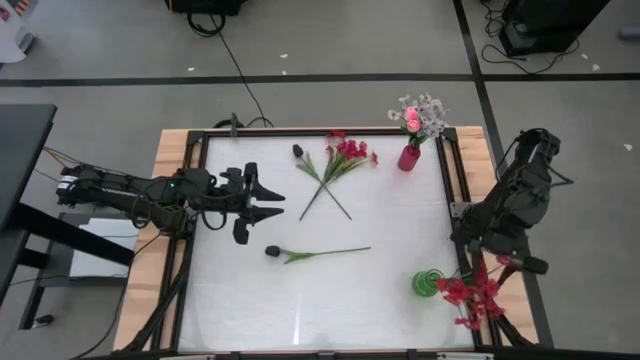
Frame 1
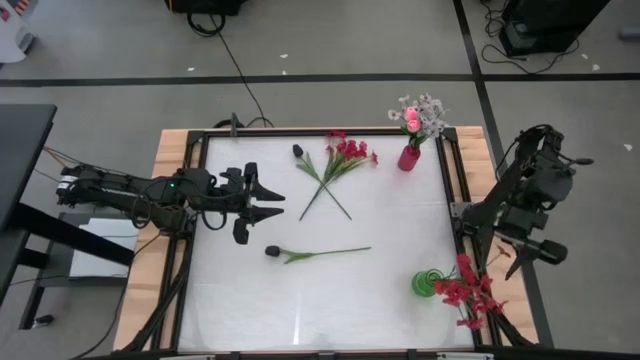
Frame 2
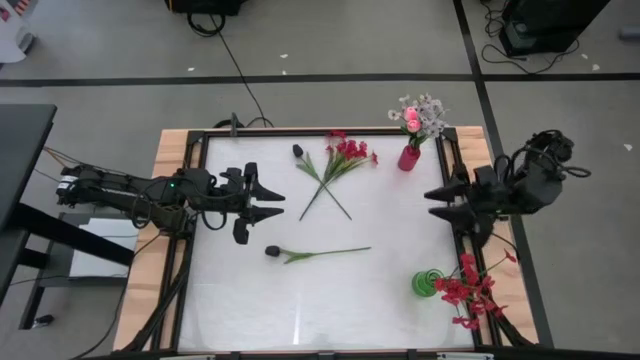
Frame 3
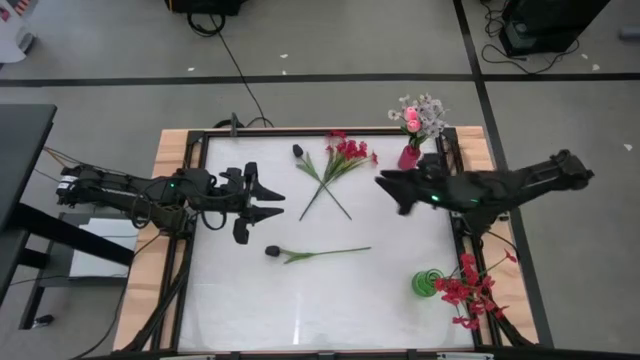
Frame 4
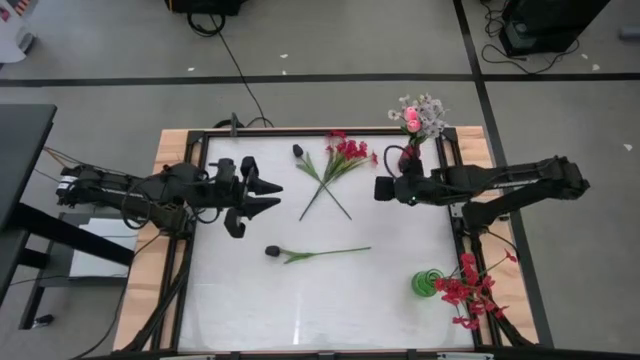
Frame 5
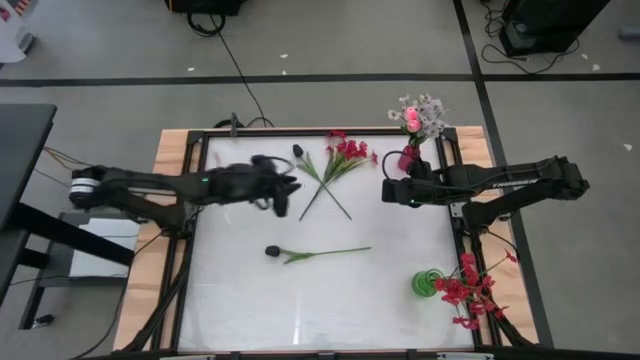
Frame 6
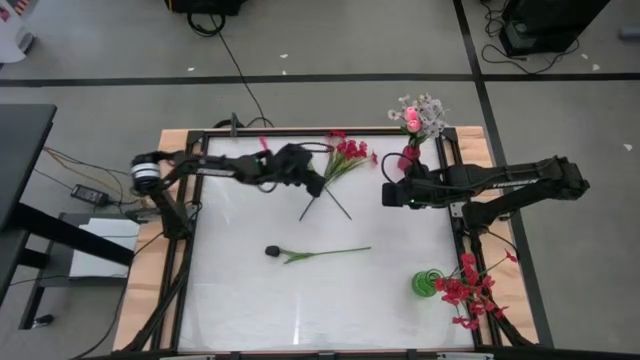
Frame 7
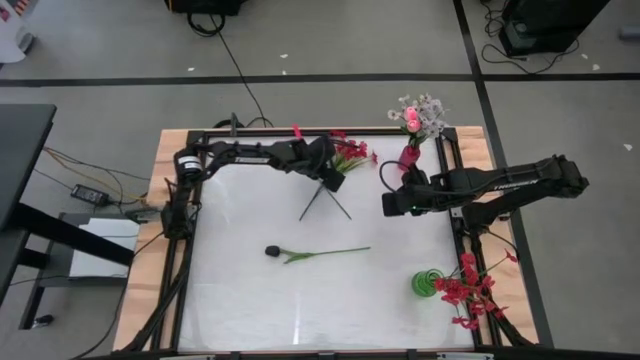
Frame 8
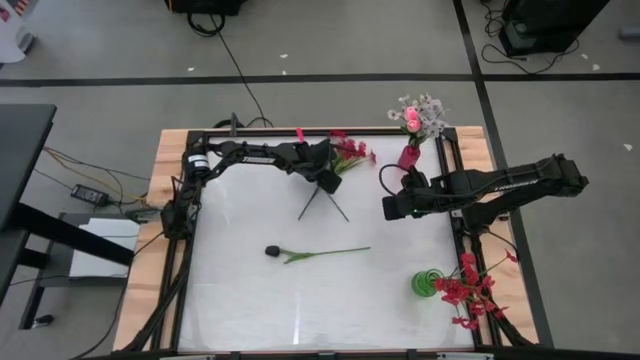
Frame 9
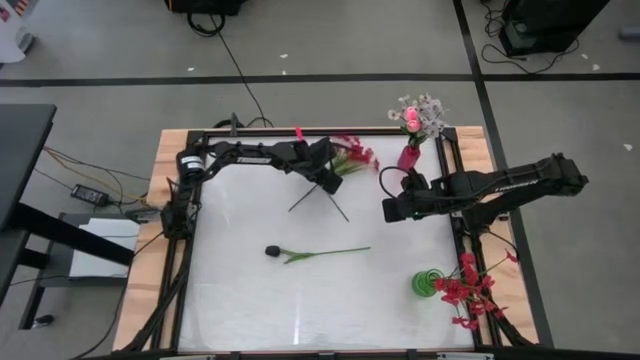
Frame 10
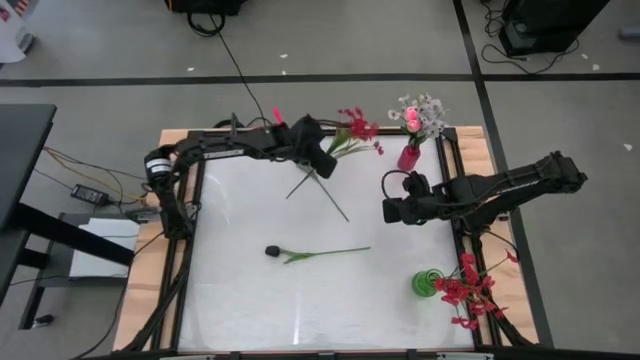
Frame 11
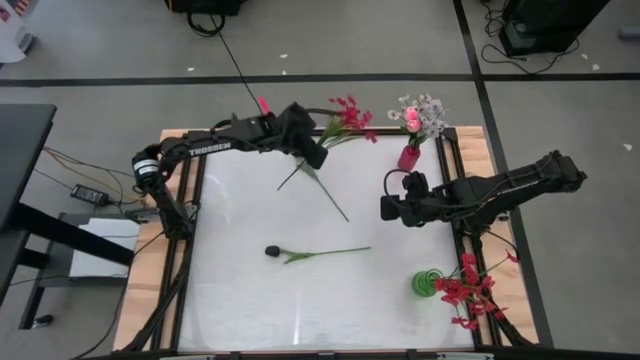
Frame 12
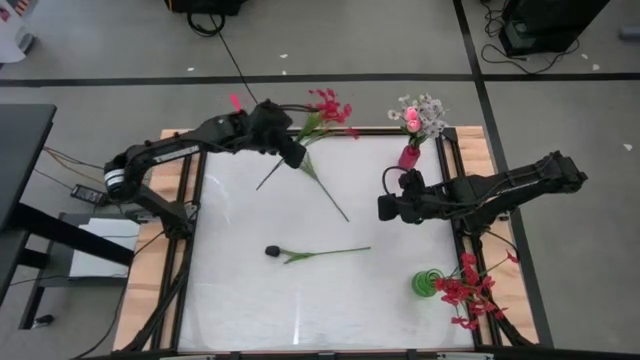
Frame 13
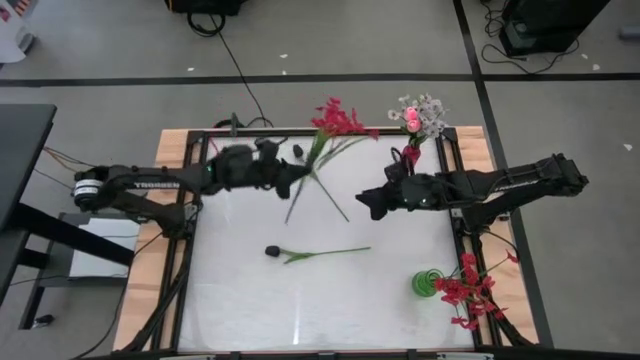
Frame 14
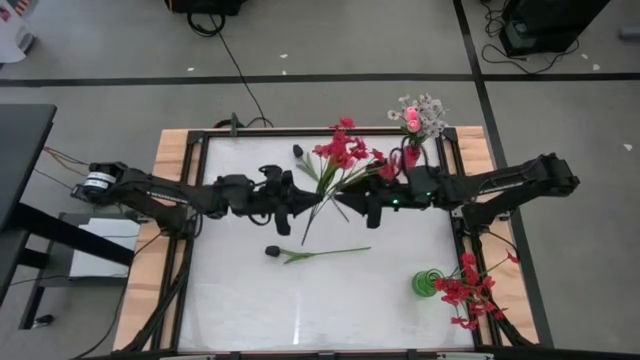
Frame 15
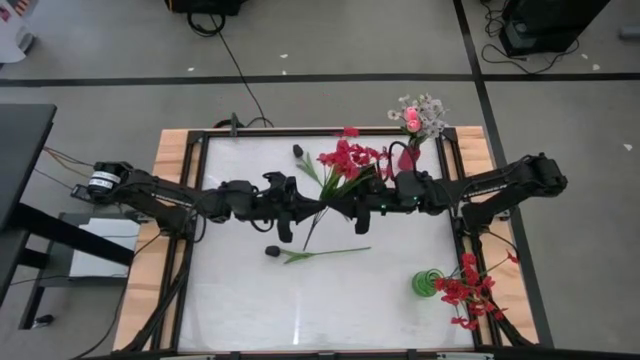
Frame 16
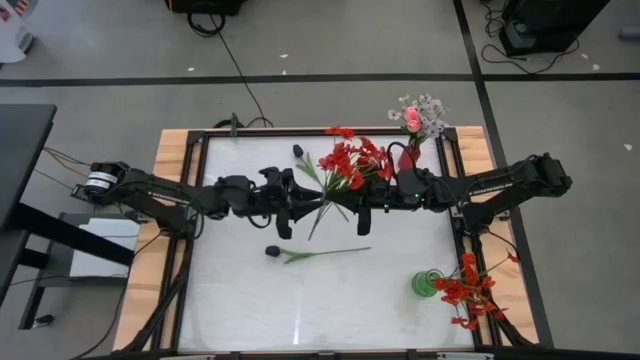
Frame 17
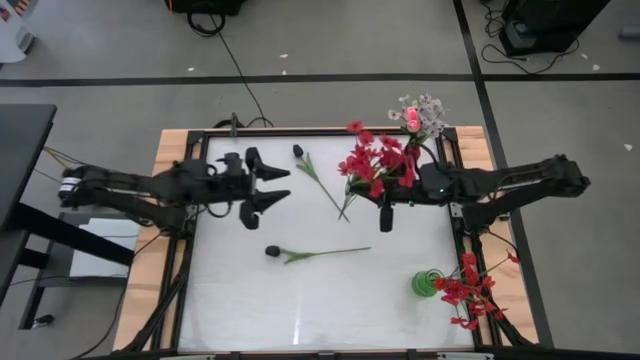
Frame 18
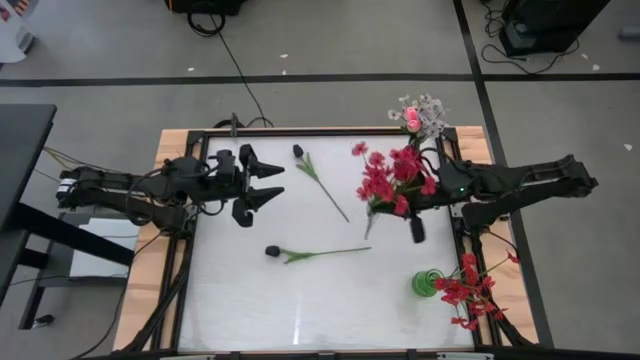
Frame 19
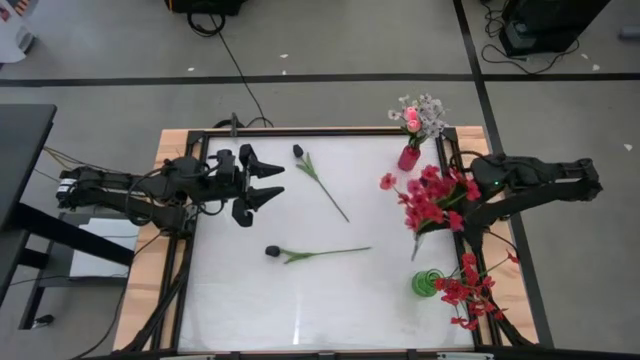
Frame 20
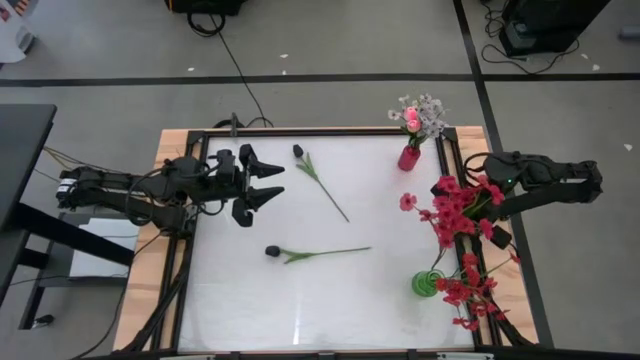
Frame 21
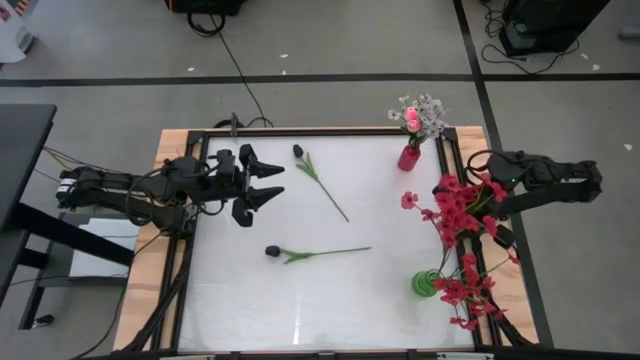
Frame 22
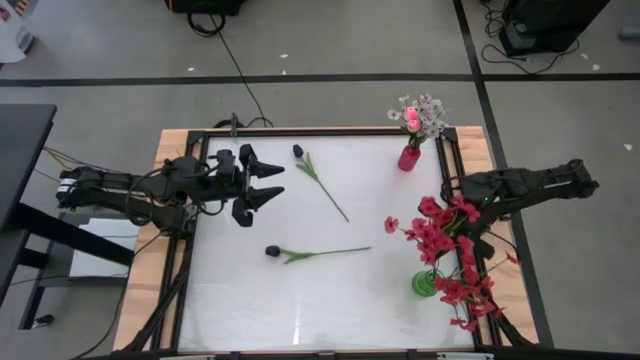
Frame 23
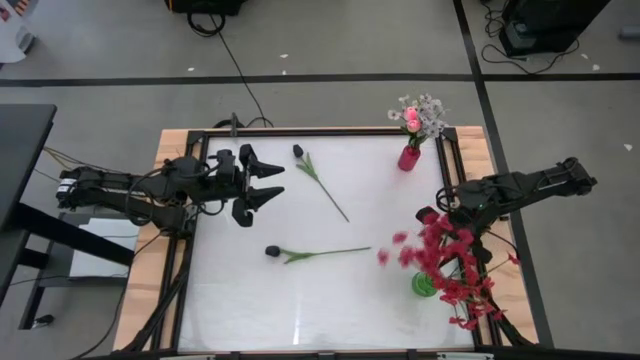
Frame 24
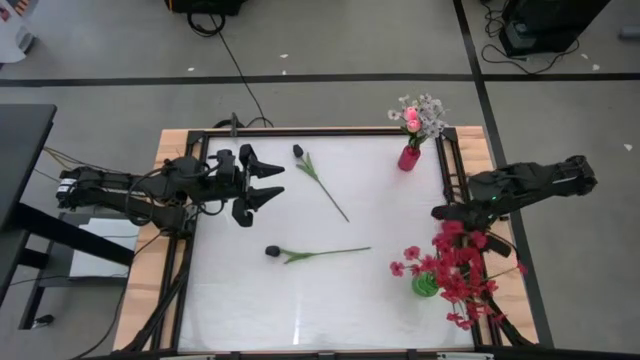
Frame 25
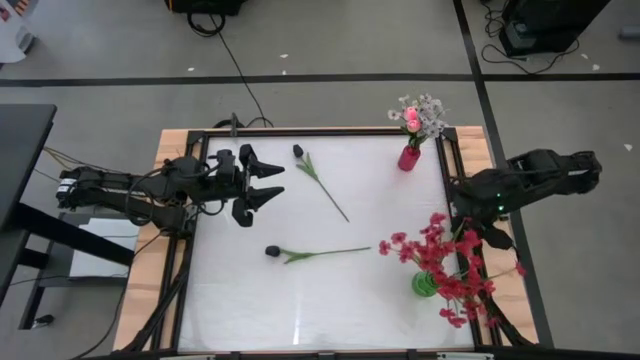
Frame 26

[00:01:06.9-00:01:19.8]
Task: Sort flowers into vase by color
Put the red flowers into the green vase
